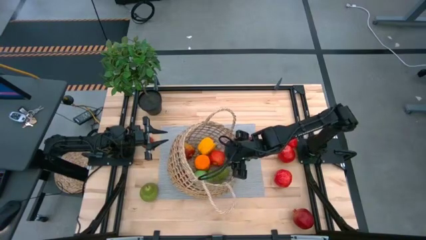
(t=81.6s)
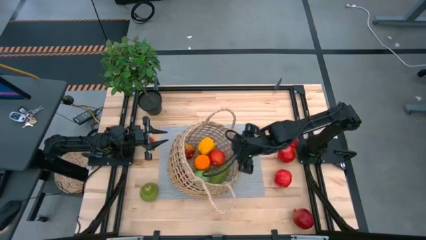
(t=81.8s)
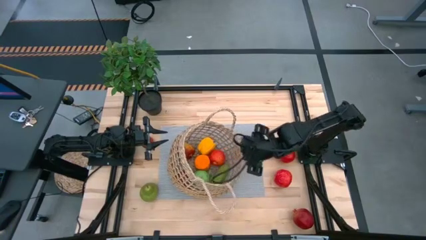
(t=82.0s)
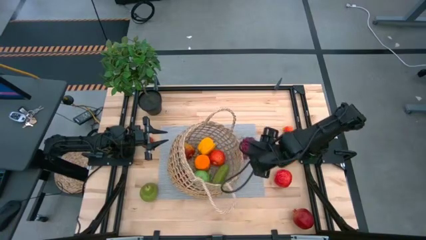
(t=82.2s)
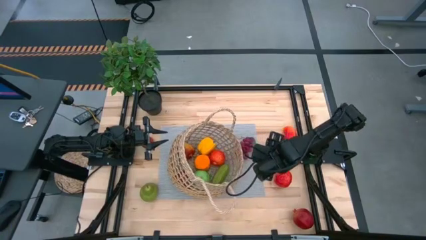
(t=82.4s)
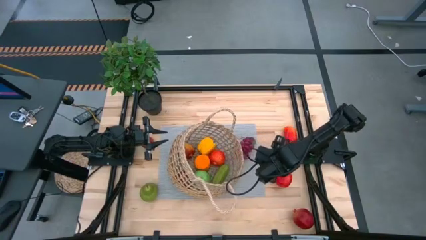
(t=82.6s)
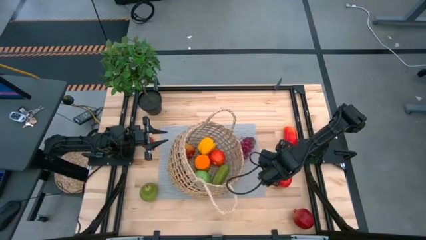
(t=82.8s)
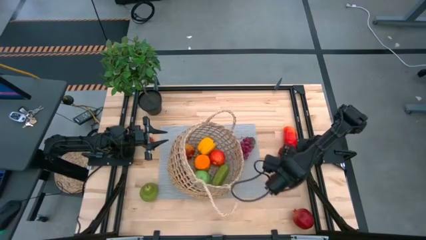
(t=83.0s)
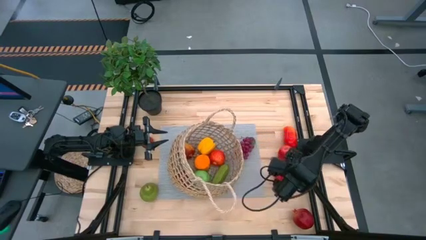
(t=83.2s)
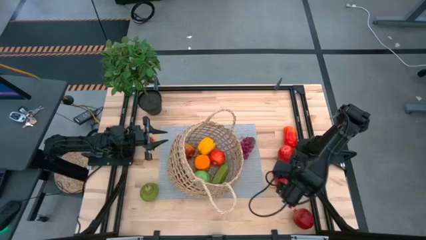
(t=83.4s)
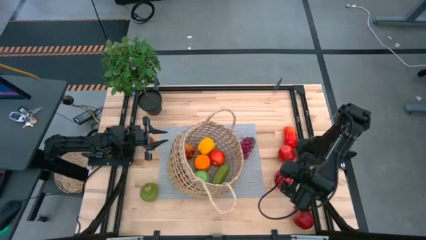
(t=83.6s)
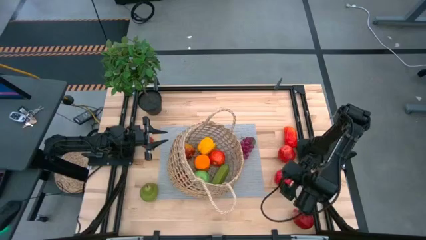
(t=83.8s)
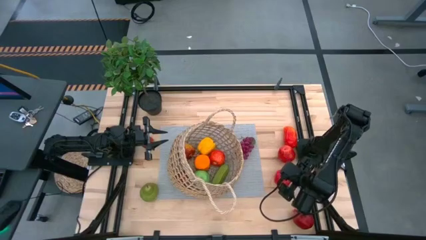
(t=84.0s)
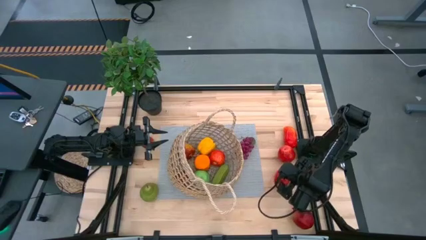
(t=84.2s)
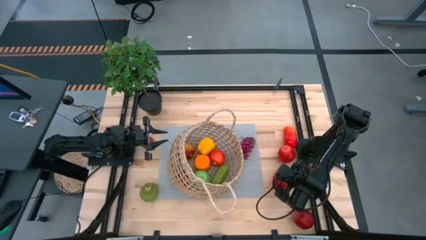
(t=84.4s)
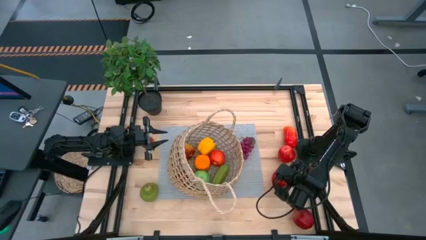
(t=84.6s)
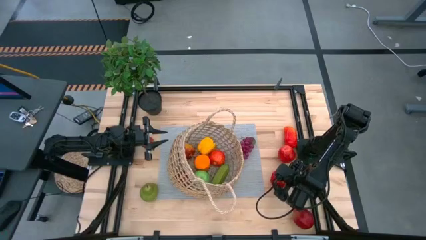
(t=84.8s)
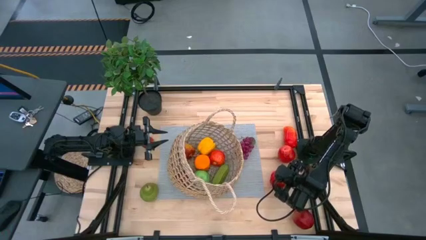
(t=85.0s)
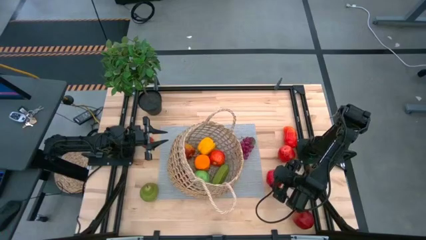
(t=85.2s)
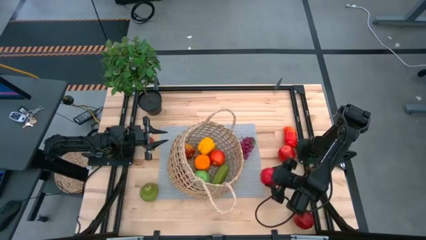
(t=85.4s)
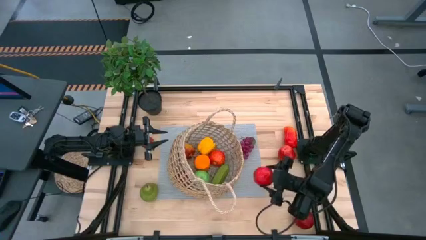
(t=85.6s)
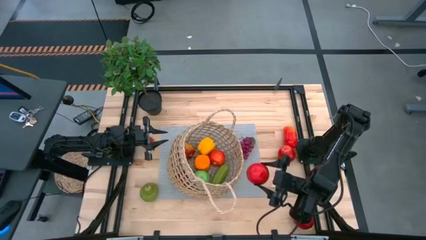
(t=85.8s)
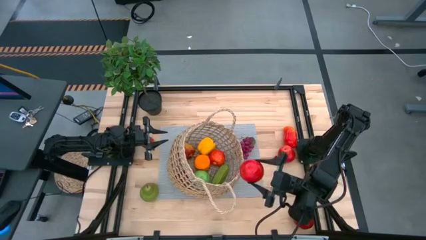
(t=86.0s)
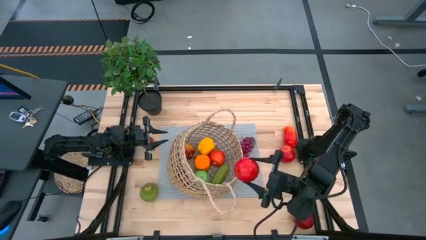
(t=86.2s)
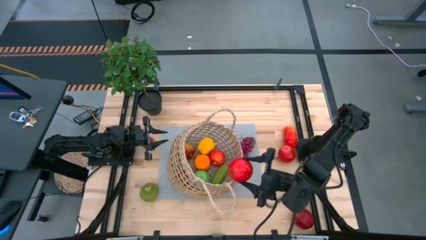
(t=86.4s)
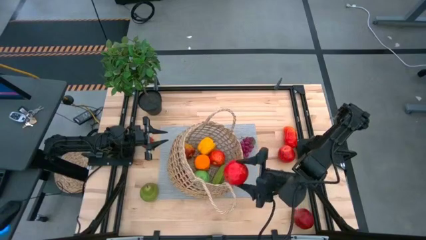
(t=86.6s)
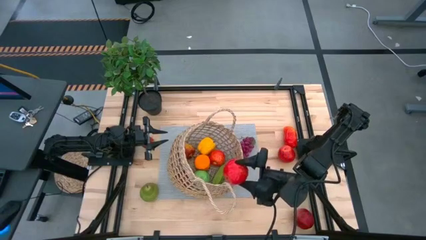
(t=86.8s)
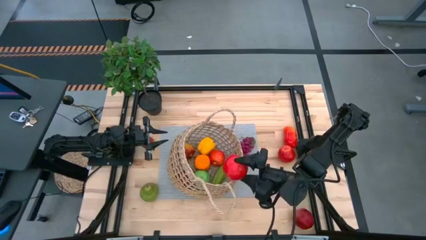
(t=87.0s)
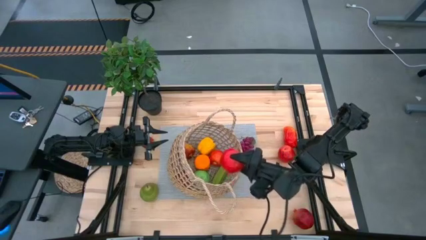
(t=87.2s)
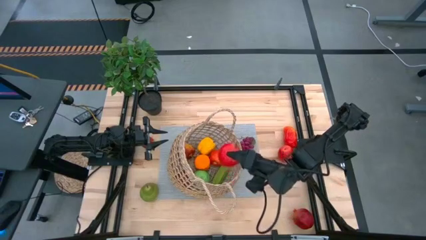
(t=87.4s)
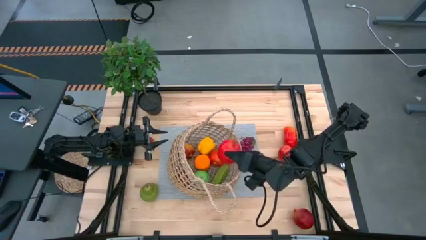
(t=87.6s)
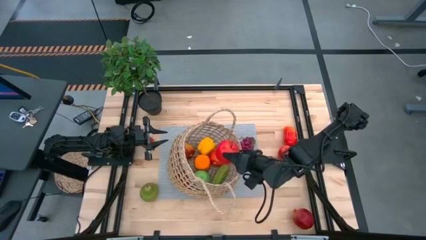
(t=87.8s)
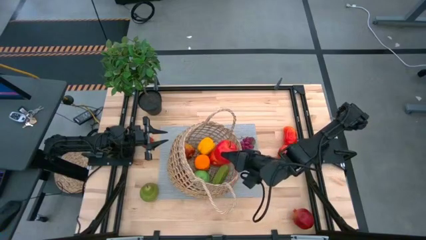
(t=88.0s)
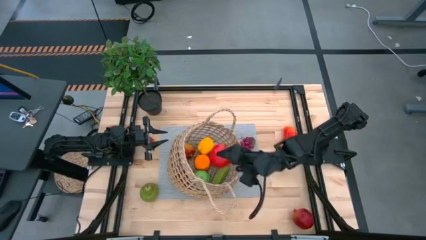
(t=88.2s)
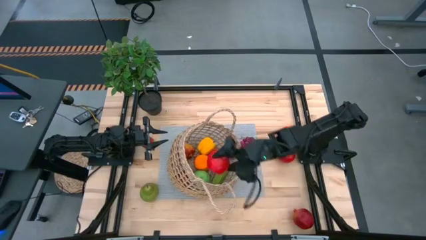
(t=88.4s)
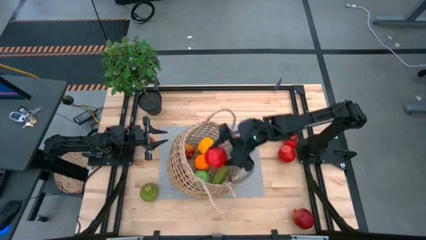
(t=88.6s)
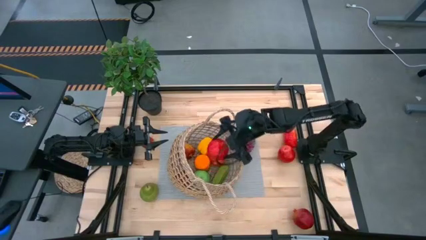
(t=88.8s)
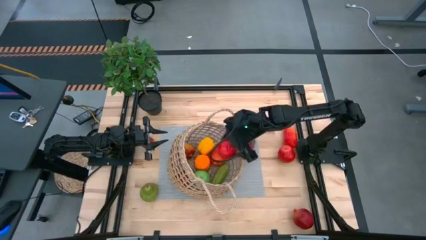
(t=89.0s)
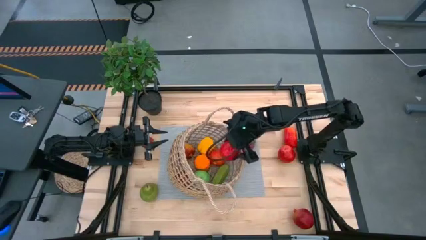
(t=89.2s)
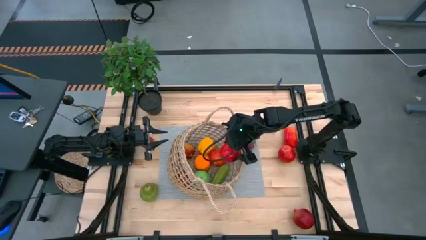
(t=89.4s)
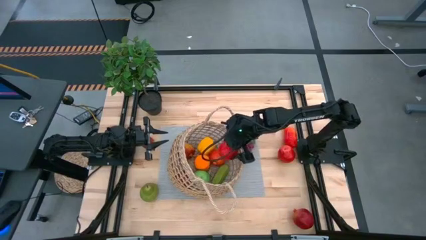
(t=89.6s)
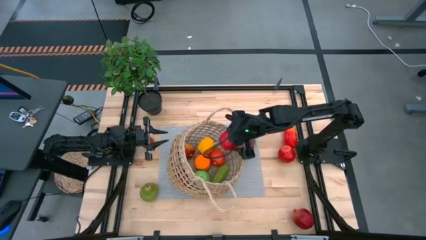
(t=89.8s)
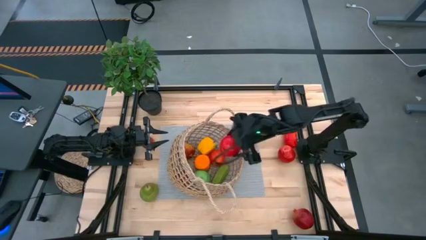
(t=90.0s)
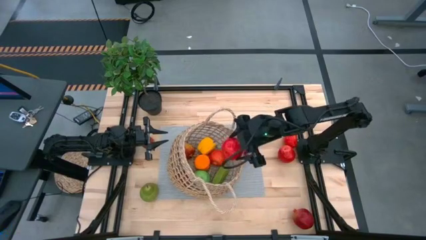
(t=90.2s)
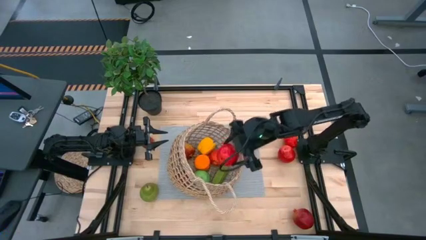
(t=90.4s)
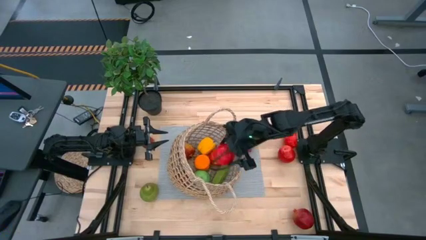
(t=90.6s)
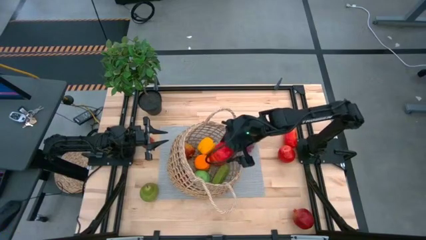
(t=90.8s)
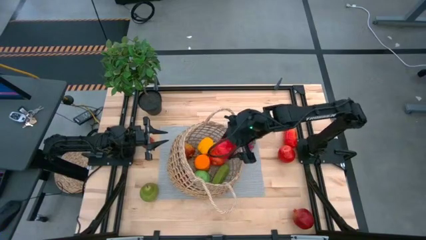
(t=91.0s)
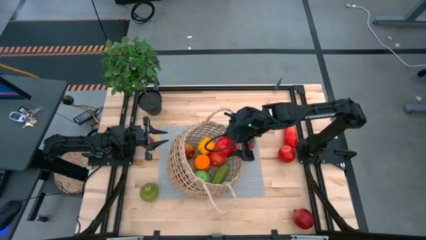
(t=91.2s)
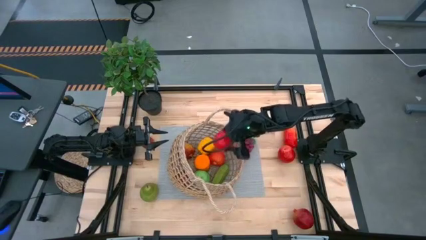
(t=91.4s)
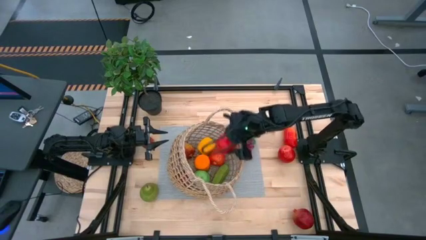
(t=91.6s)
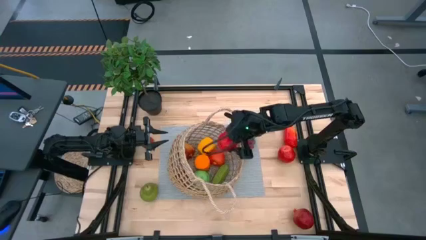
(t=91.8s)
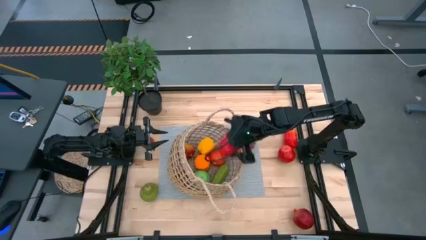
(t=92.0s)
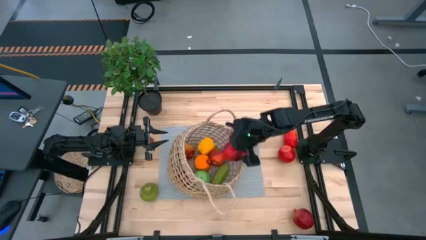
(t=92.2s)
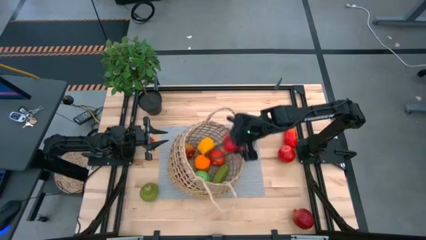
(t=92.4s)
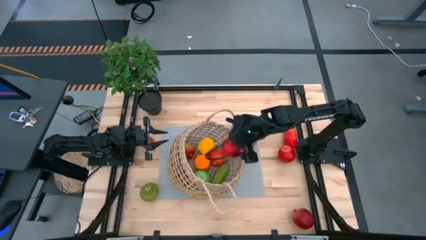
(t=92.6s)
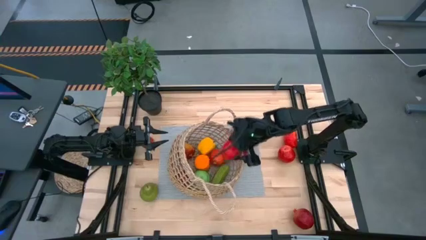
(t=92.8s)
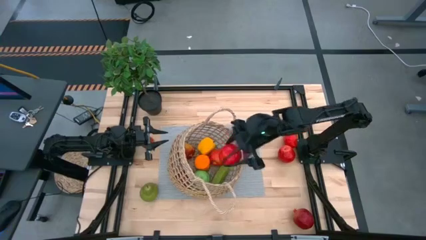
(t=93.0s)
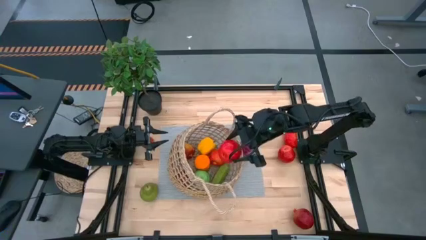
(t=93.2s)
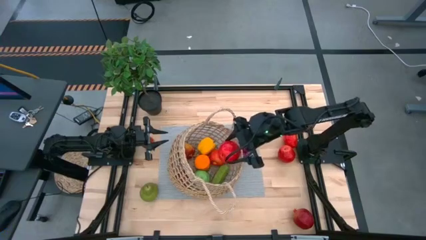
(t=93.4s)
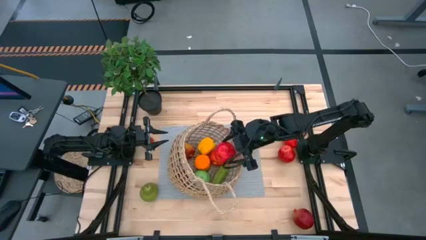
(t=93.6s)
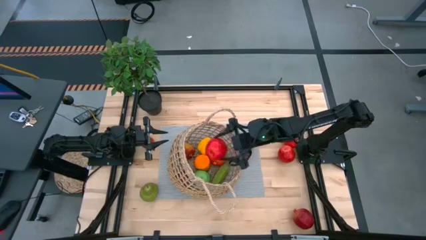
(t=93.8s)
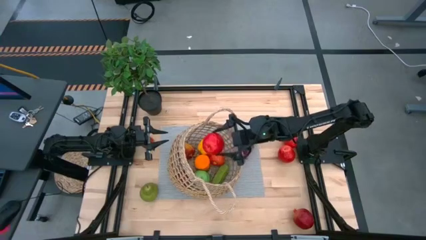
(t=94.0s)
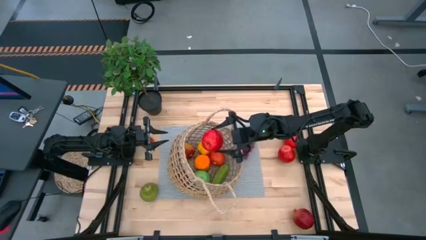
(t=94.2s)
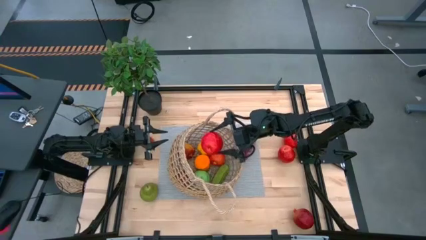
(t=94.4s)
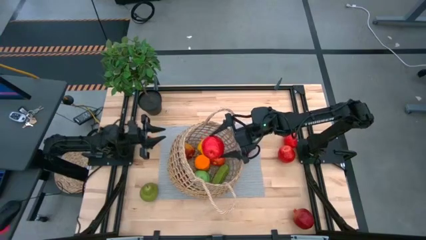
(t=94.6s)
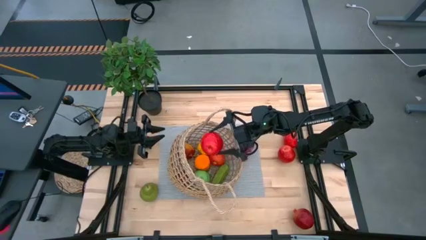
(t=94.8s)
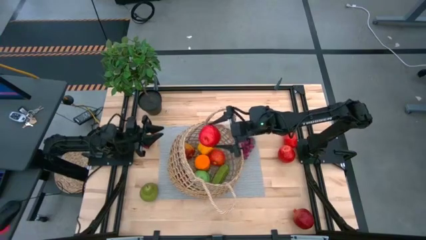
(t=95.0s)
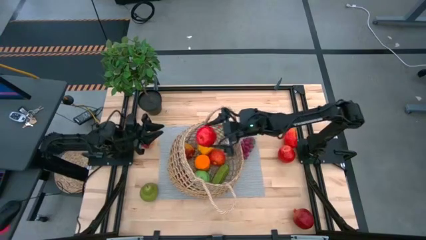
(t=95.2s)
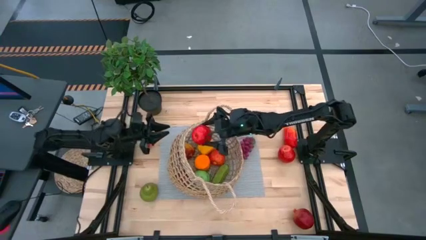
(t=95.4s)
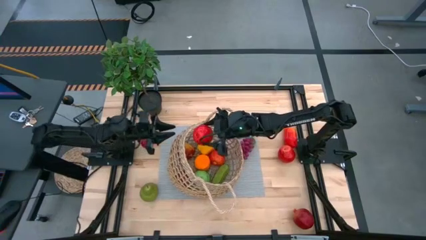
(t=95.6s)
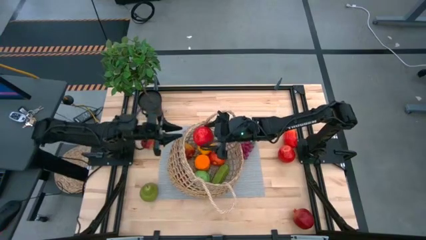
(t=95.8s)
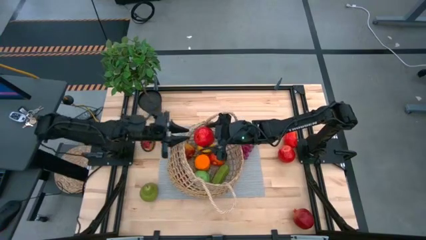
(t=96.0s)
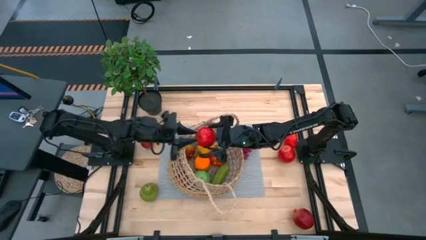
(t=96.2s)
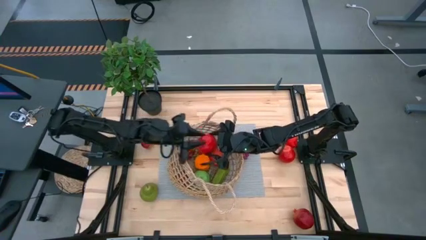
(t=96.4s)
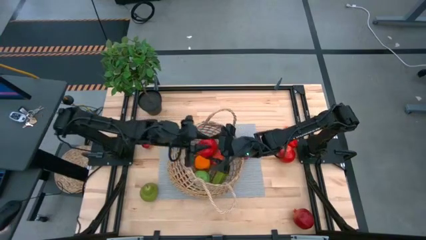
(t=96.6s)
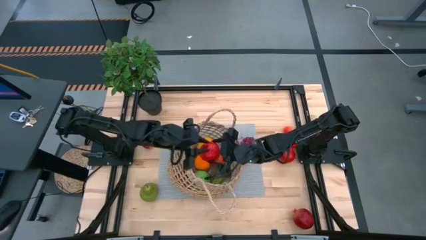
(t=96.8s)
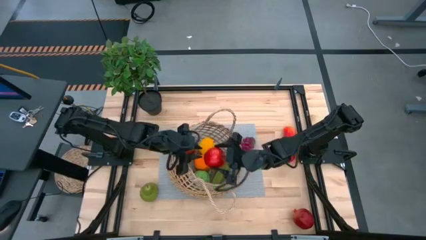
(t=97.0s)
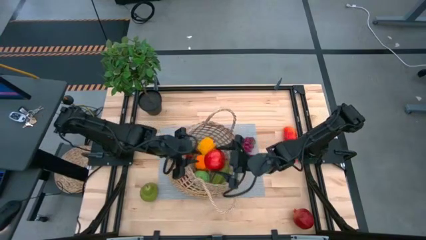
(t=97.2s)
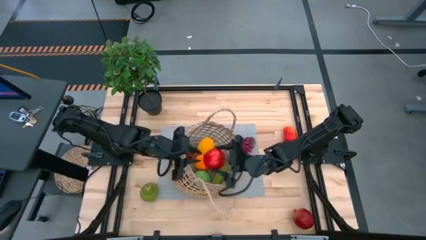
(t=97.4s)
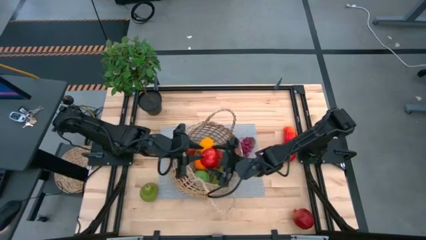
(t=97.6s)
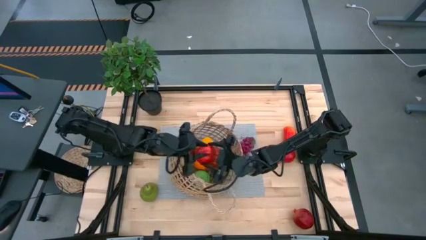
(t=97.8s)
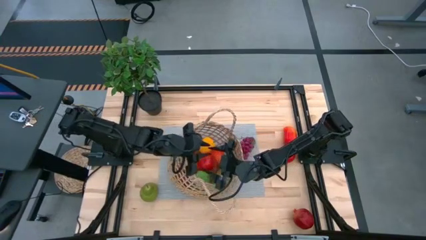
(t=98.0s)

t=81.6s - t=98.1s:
Task: Build produce basket
Put the red apple into the brown basket

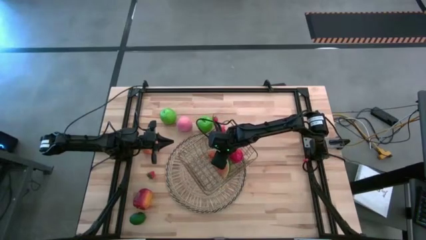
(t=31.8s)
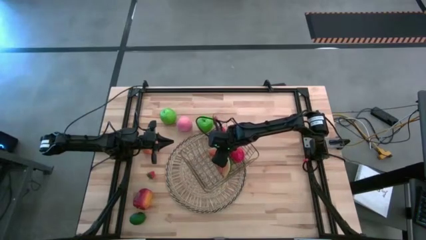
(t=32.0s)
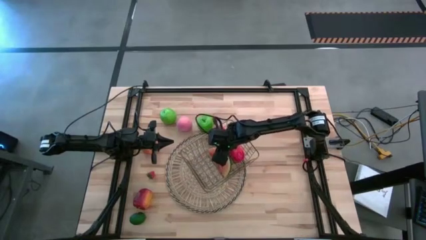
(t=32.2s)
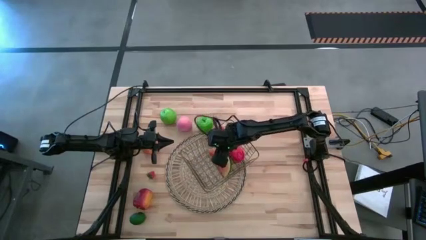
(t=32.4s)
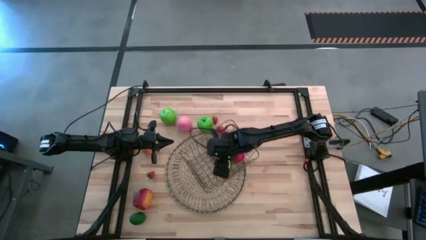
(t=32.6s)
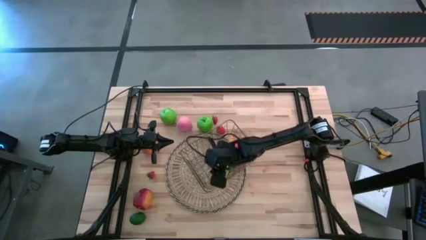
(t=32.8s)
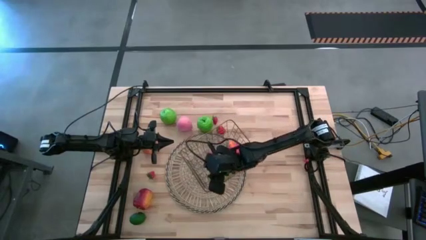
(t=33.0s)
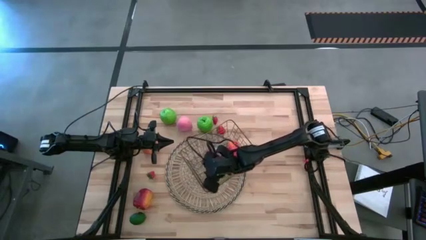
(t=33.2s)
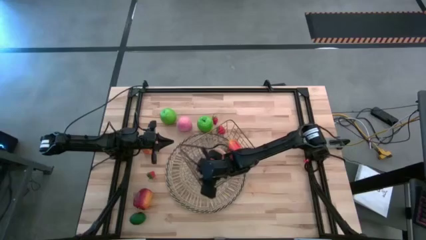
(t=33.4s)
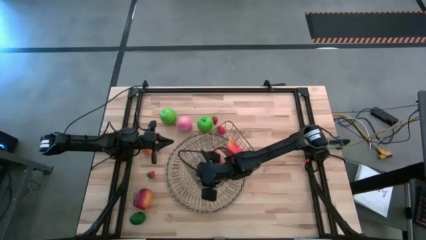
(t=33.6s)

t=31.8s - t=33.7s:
Task: Build produce basket
Adjust the gold wire basket
